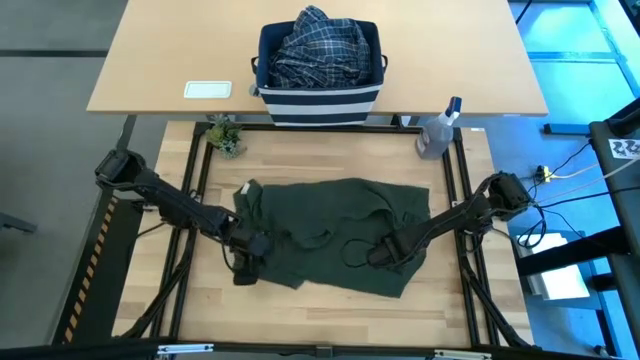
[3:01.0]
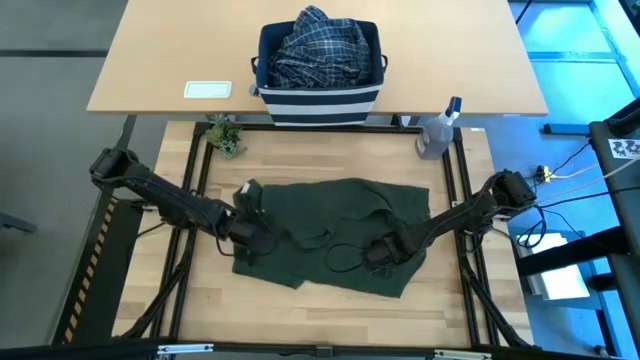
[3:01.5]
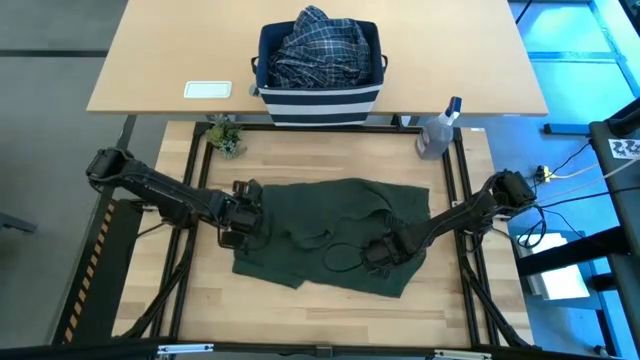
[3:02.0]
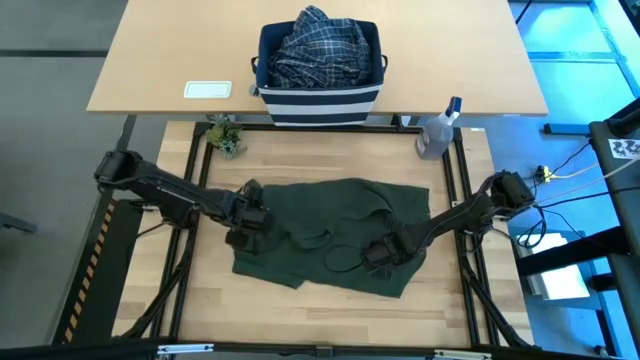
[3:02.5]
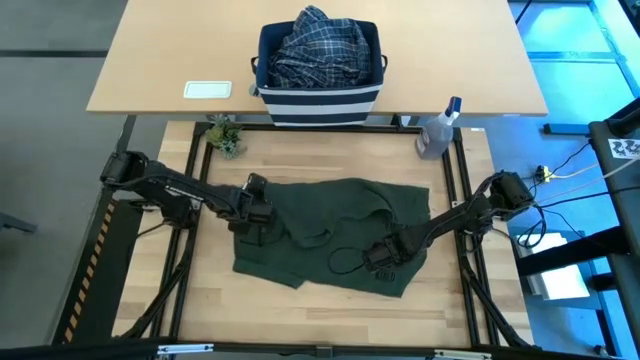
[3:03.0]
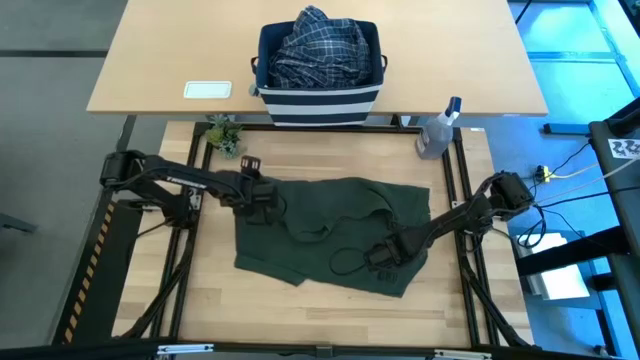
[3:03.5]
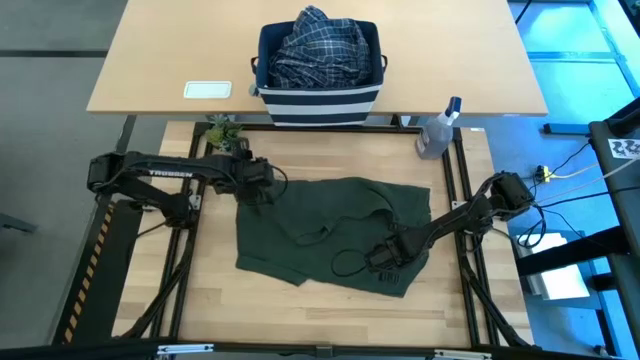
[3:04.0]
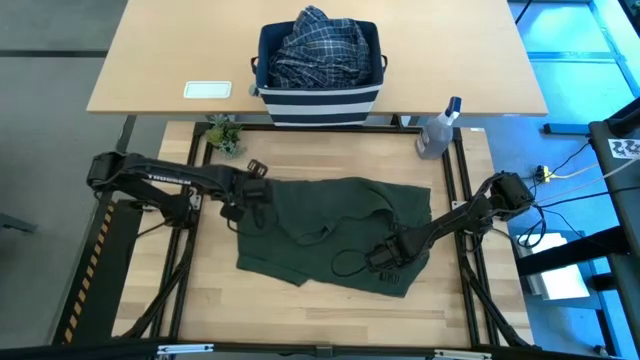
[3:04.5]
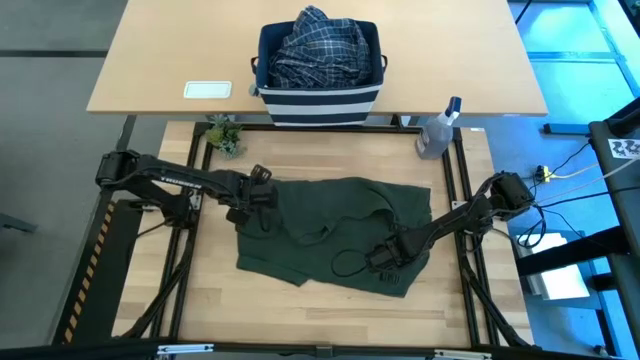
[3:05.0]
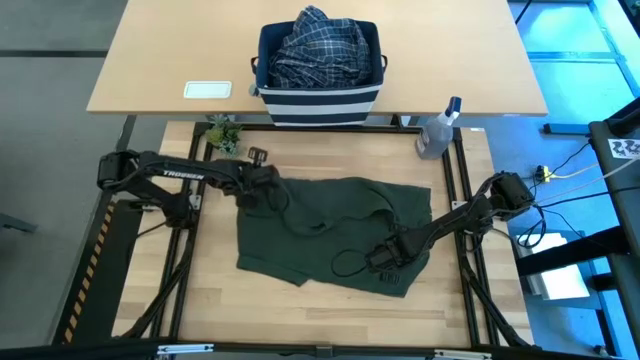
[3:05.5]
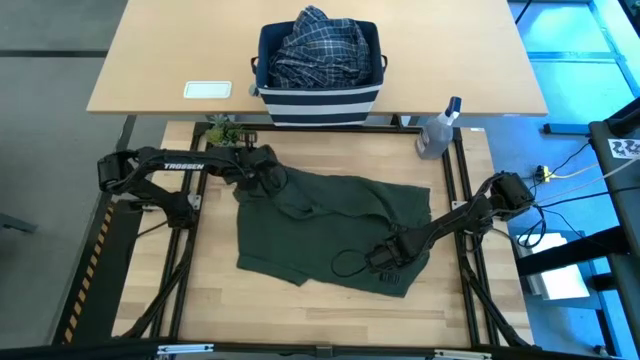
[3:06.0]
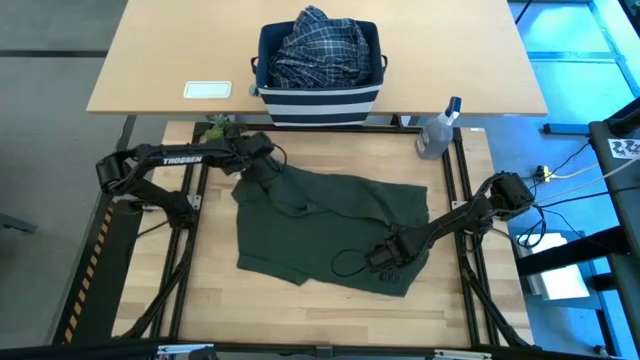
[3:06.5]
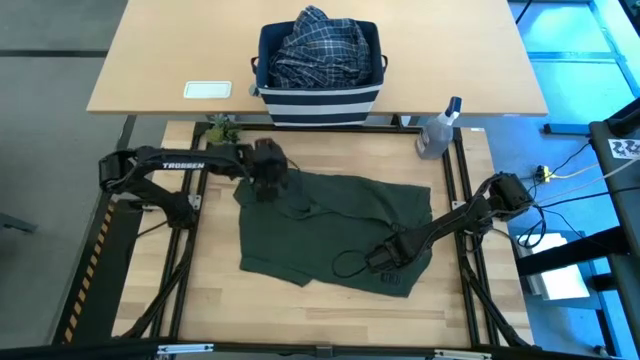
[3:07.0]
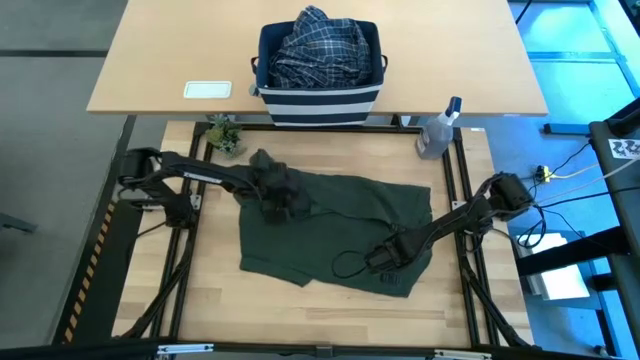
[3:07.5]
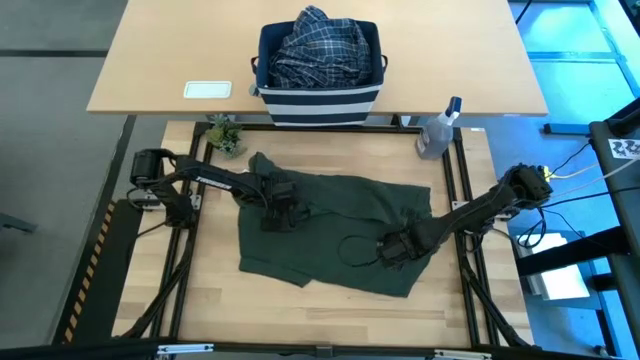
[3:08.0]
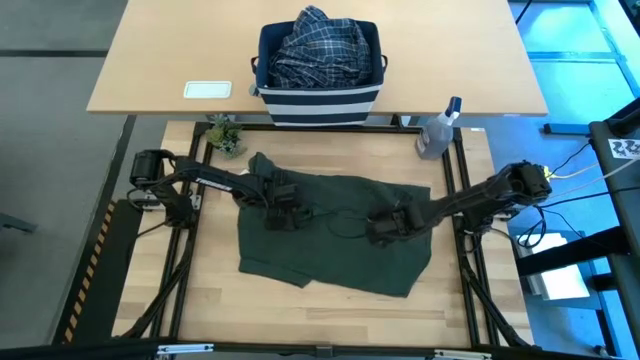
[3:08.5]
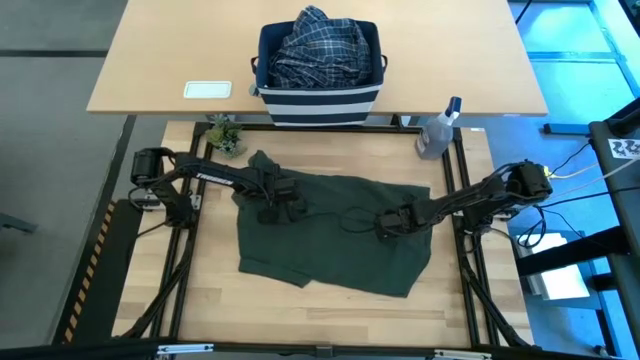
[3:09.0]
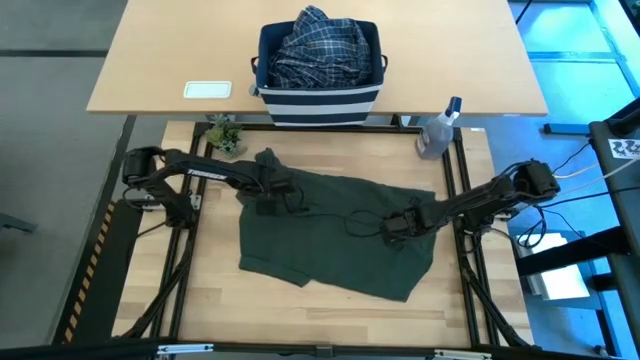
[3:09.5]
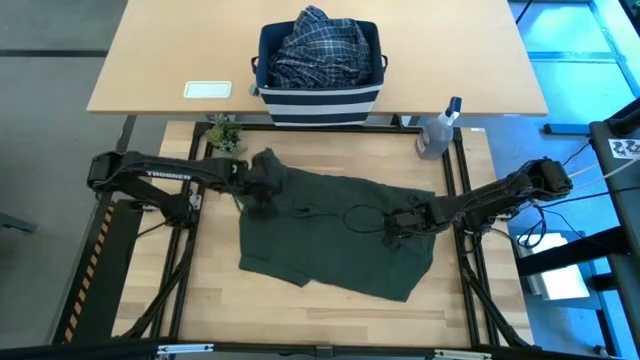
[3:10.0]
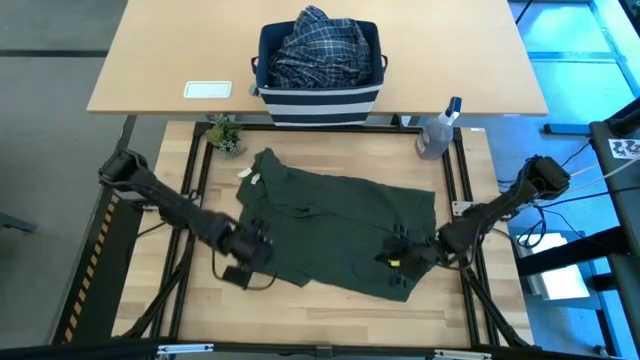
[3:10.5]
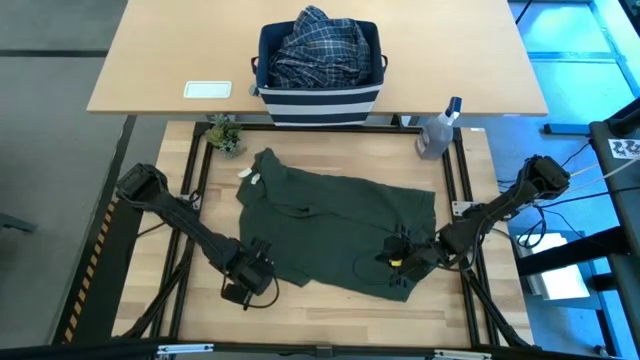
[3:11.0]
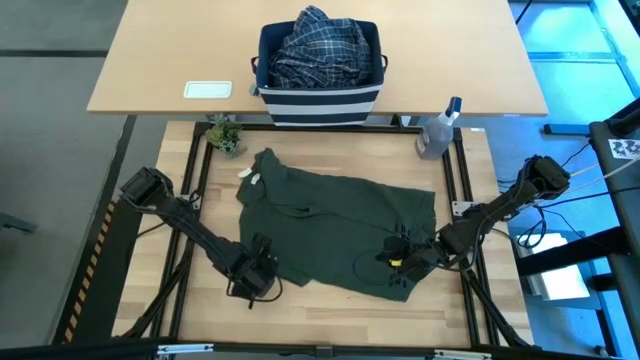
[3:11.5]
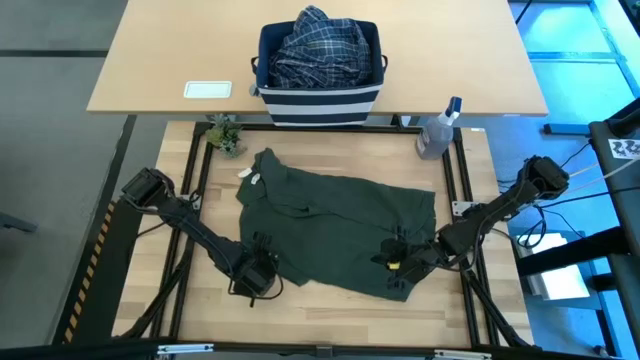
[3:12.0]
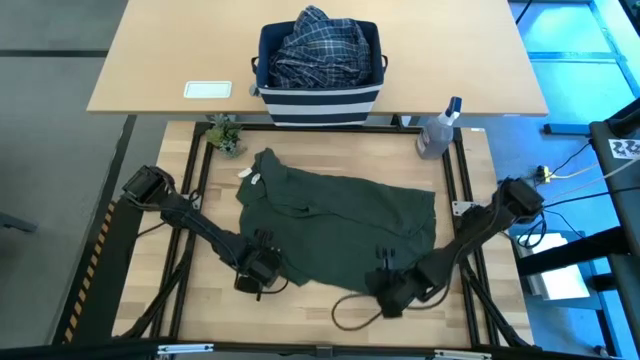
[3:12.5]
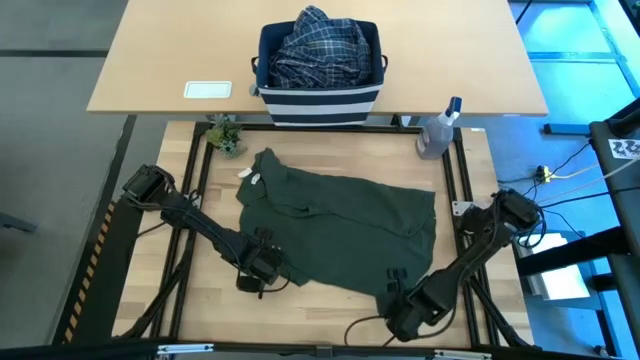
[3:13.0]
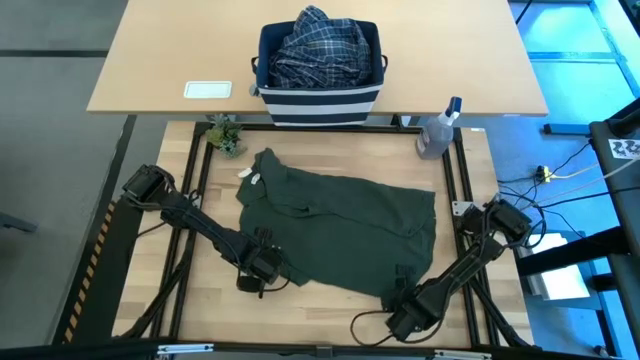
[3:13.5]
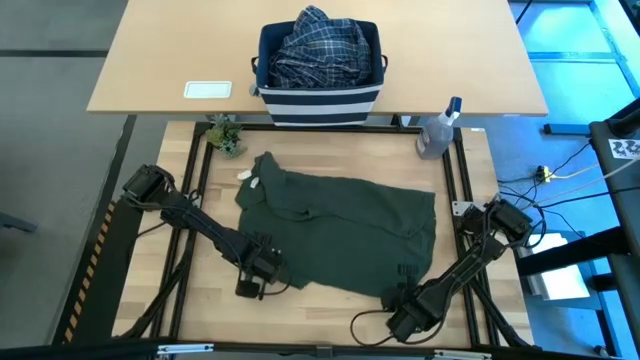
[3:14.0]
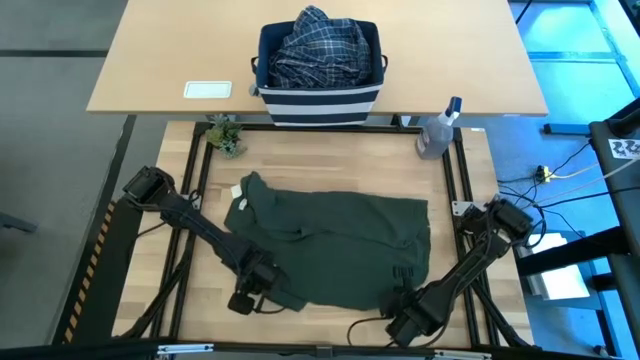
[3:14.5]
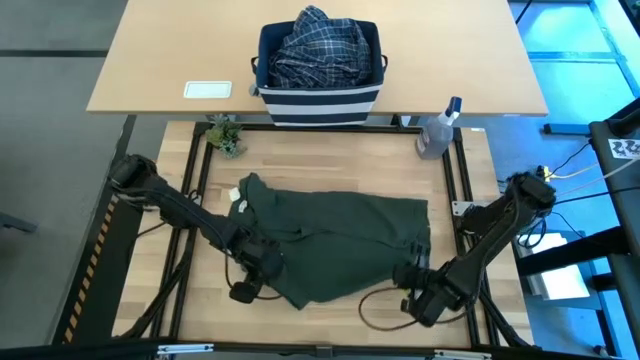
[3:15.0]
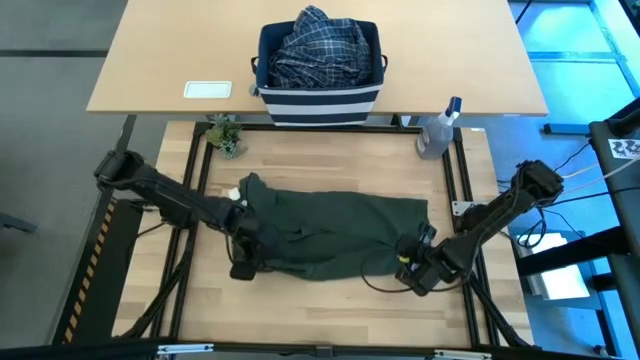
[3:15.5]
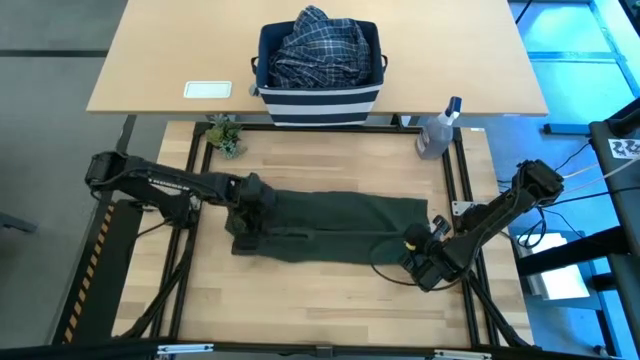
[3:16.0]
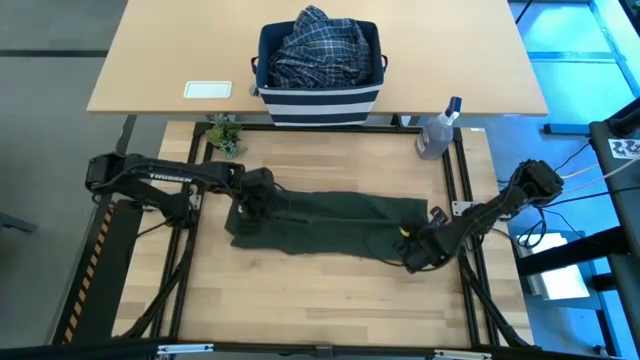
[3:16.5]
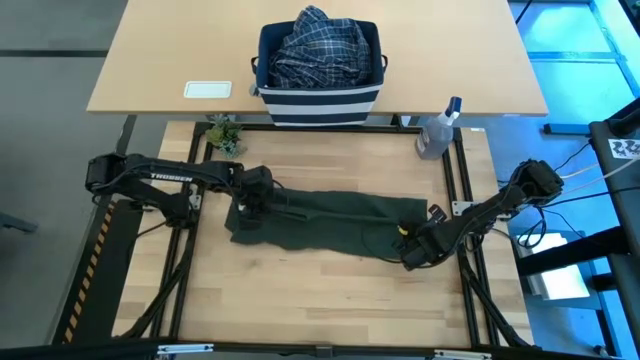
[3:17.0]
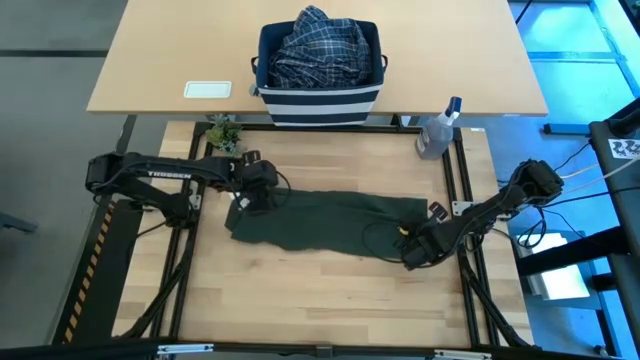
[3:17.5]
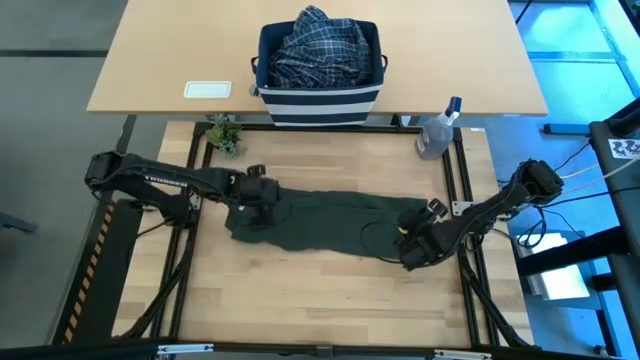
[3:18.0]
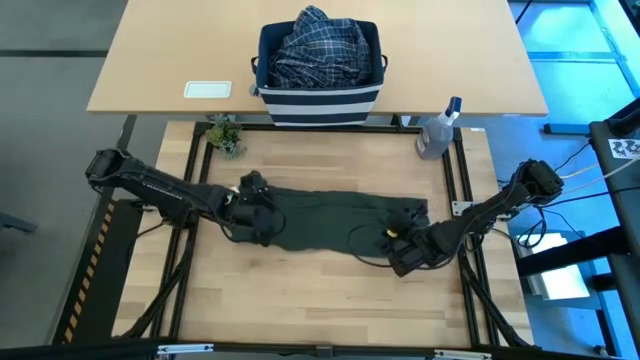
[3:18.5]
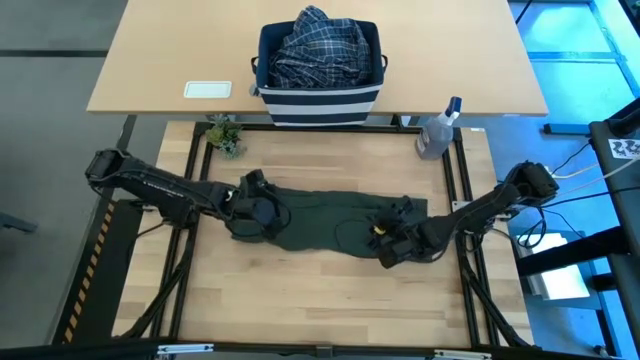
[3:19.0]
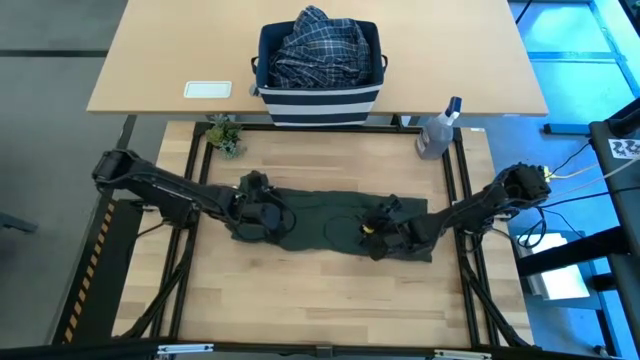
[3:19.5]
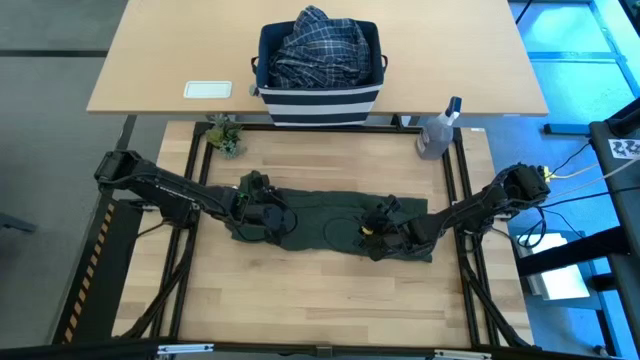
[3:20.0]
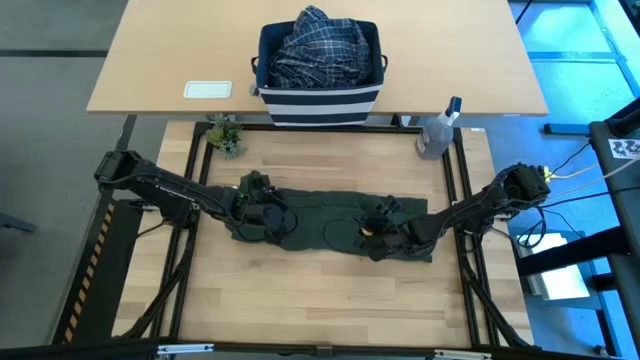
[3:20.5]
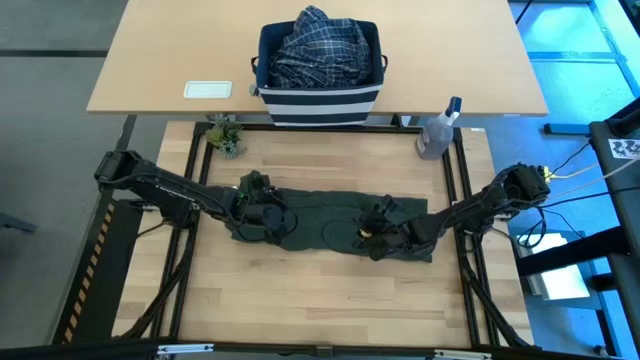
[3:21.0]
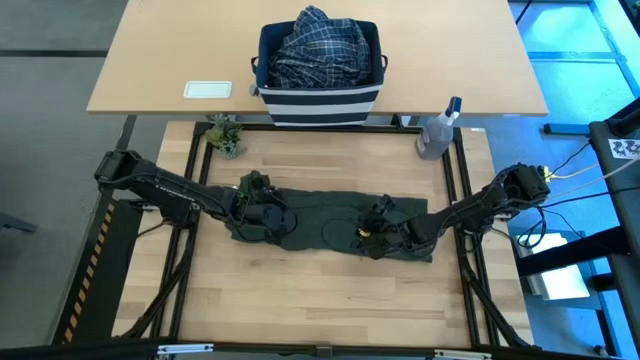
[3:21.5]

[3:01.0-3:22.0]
Task: Fold Laundry from Bin
Fold the green polo shirt
